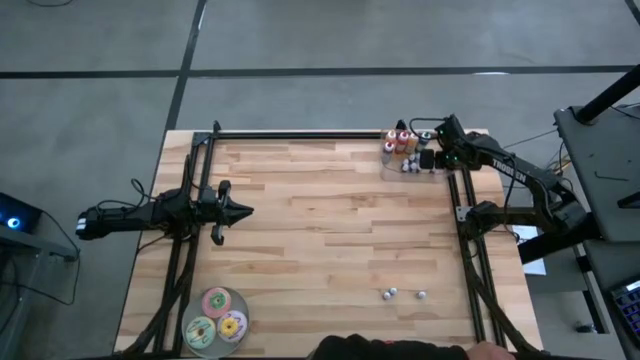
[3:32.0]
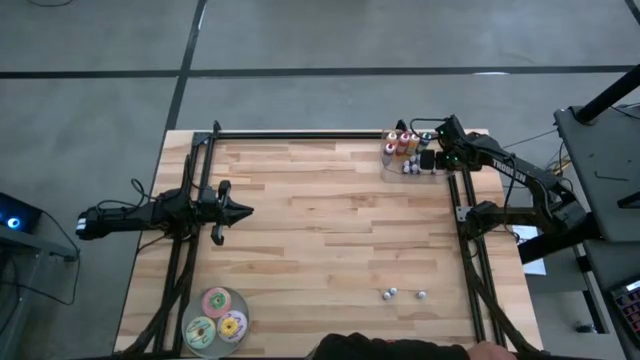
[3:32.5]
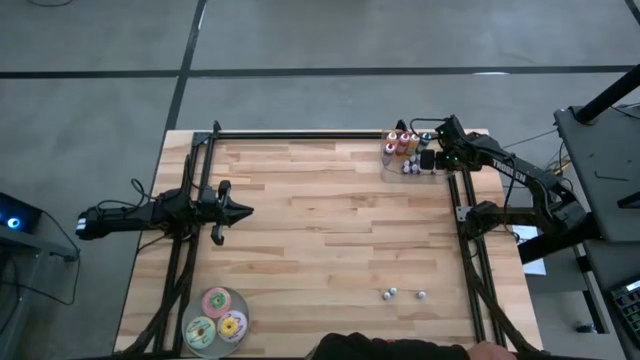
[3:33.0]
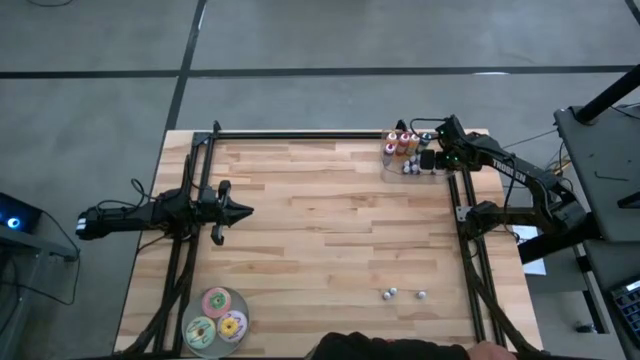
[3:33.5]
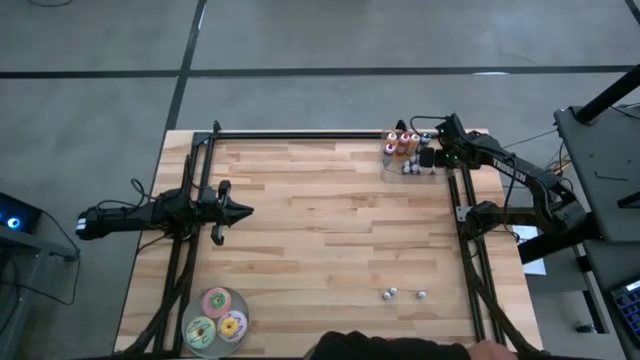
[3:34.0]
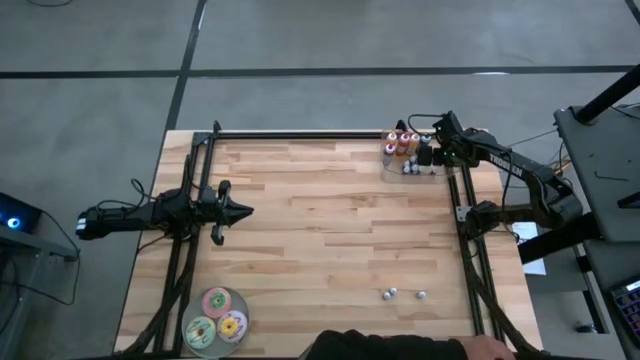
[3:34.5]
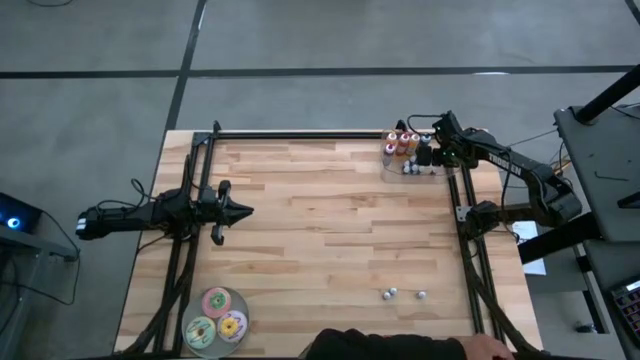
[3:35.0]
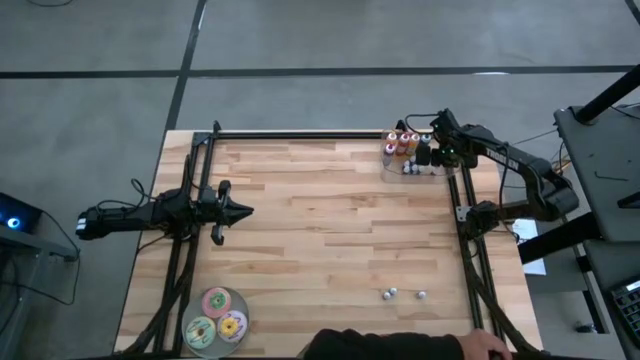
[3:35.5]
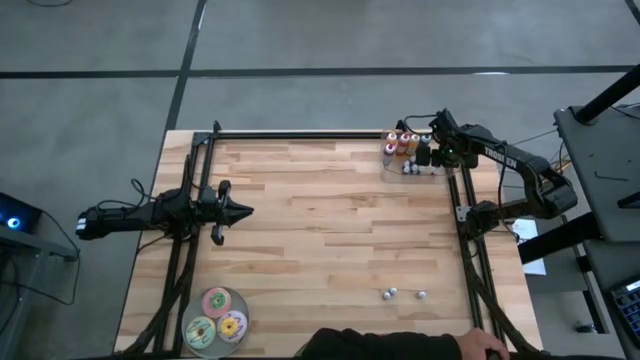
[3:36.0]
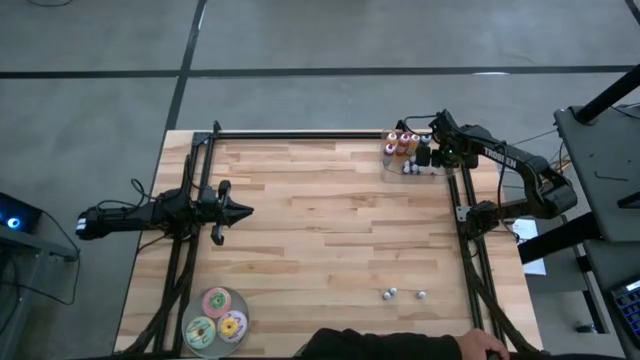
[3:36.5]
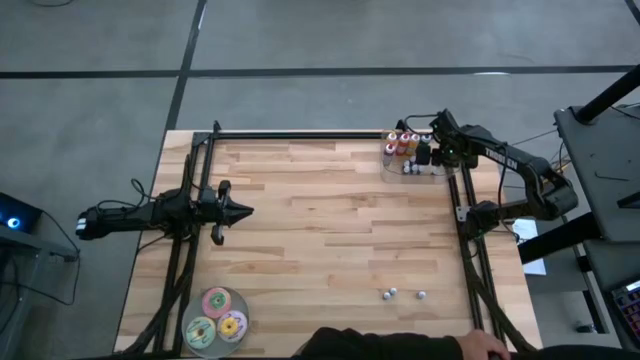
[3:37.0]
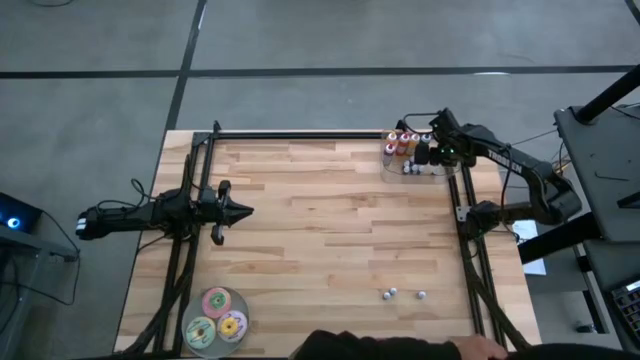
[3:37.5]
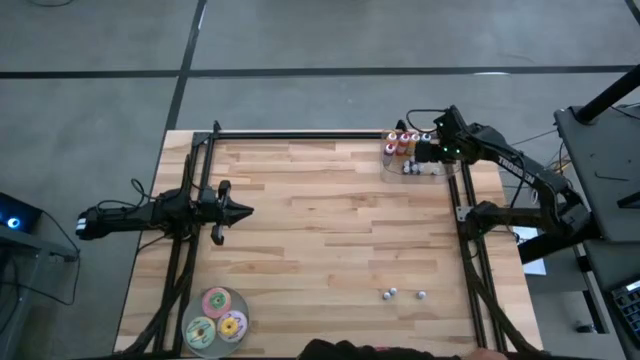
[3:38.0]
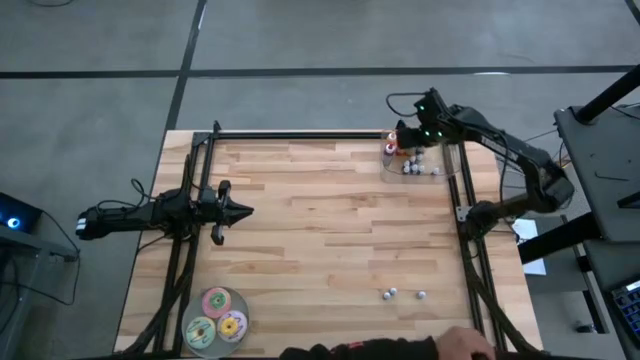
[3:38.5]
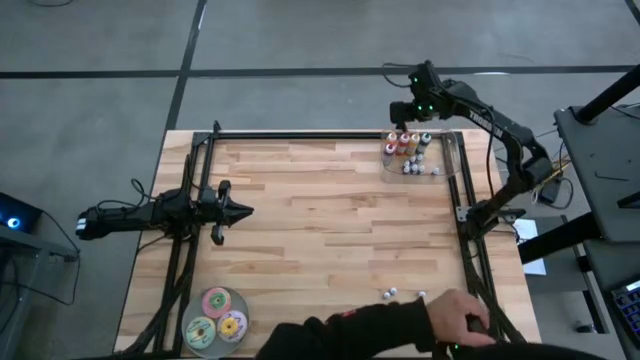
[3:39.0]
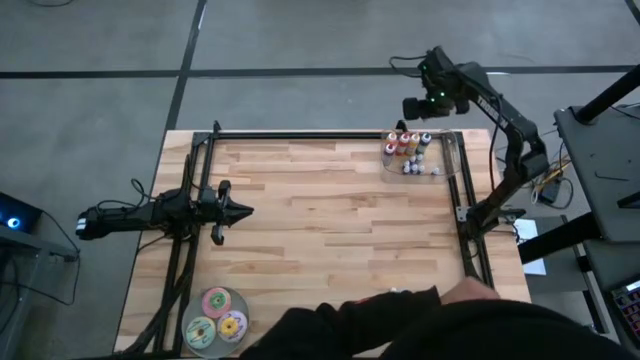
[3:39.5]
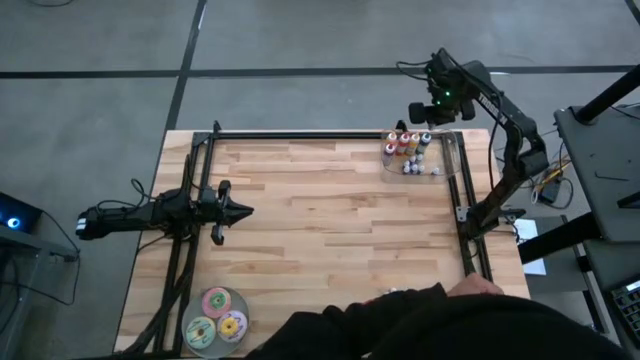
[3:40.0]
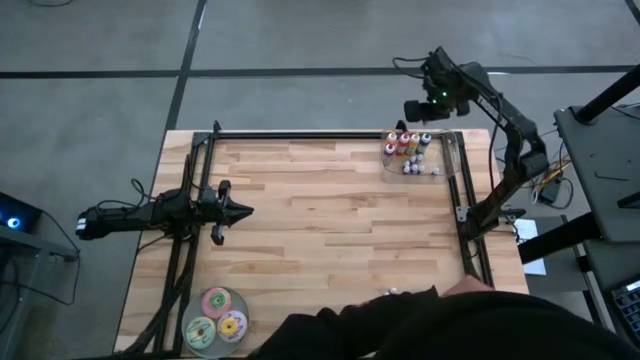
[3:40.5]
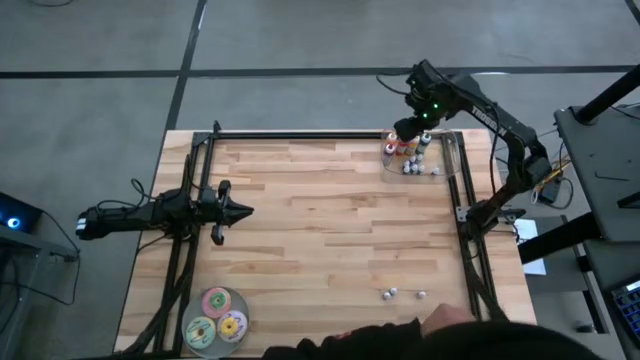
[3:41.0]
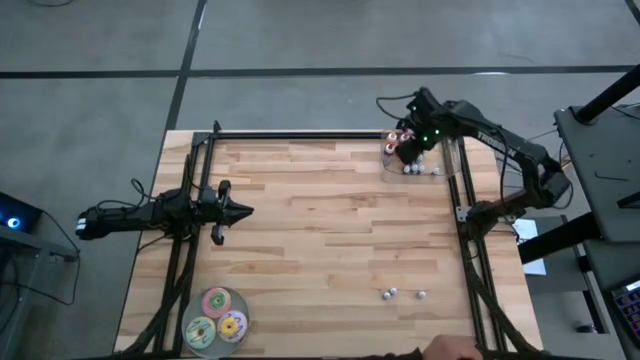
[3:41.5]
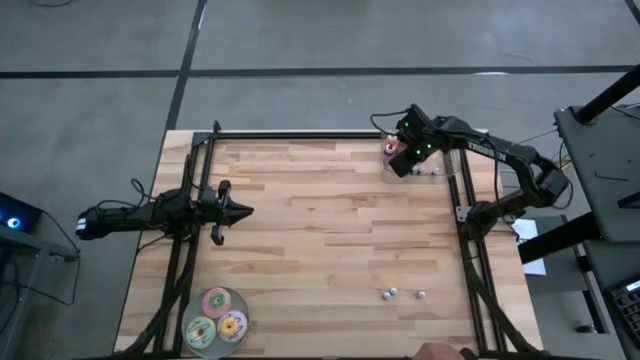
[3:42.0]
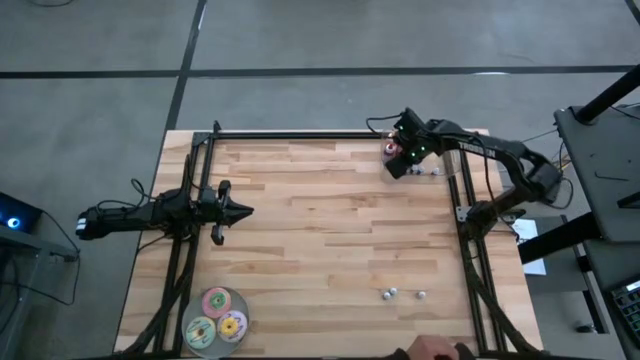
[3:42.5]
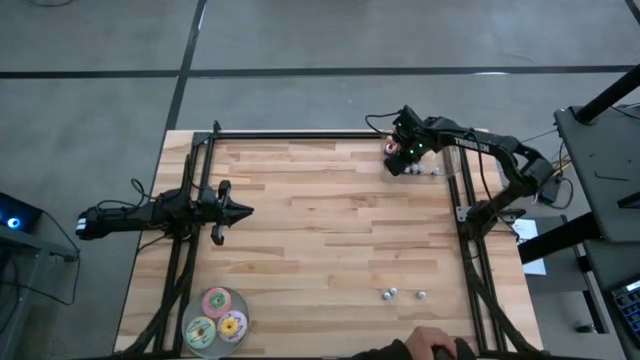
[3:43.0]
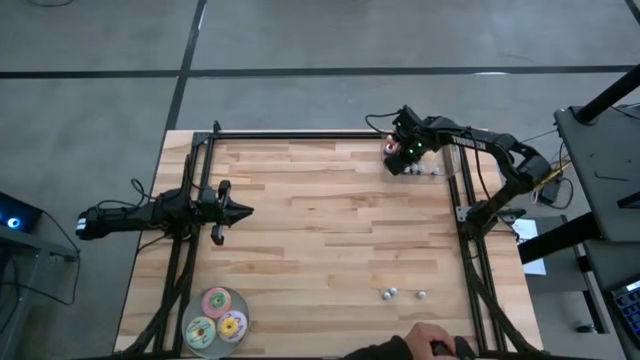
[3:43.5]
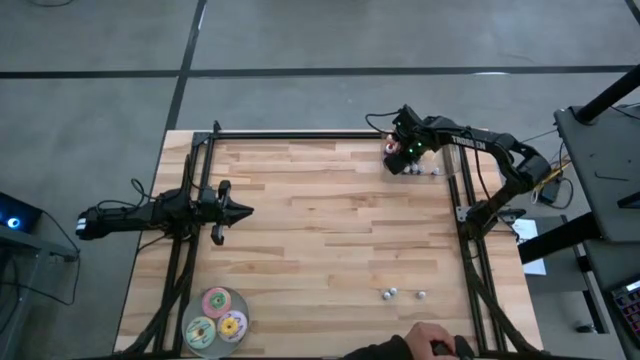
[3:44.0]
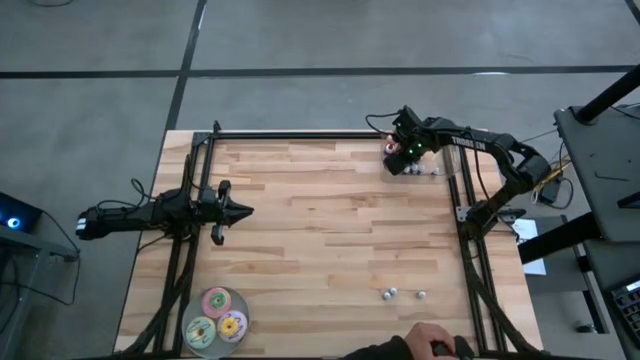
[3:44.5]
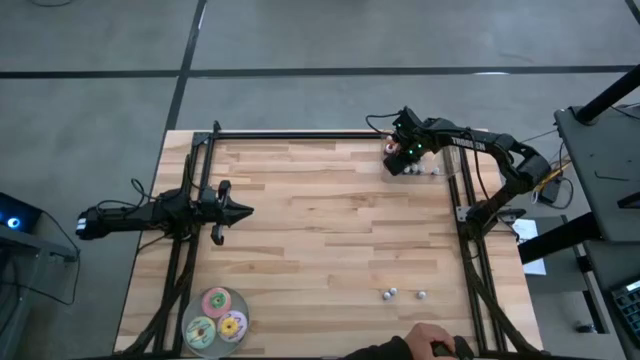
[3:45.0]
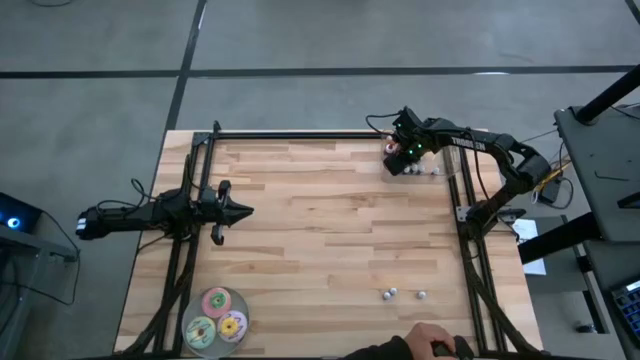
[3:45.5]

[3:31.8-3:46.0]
Task: Pick & Place food coloring
Put the small green food coloring bottle into the bin

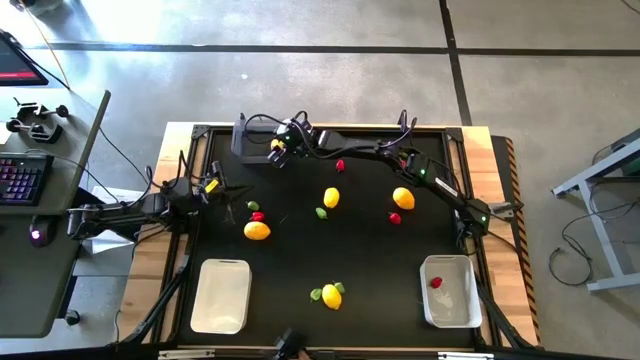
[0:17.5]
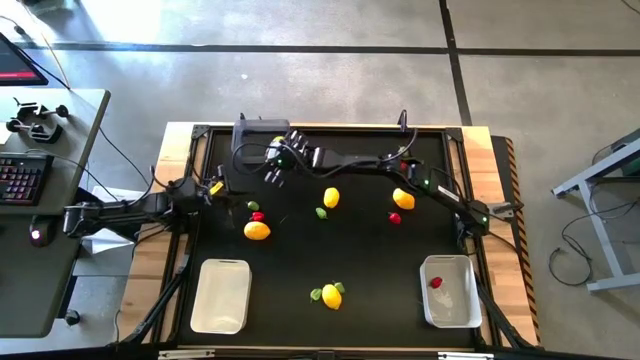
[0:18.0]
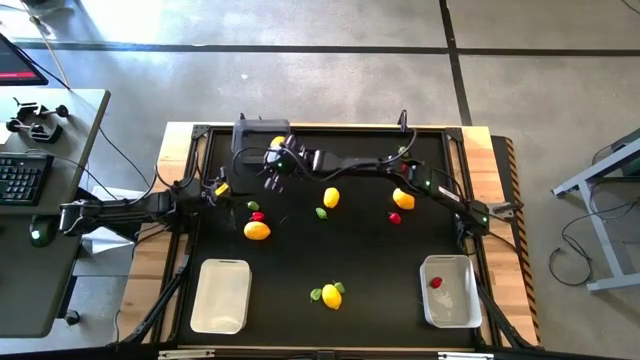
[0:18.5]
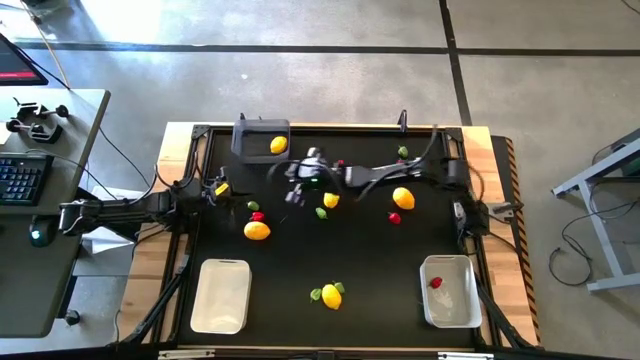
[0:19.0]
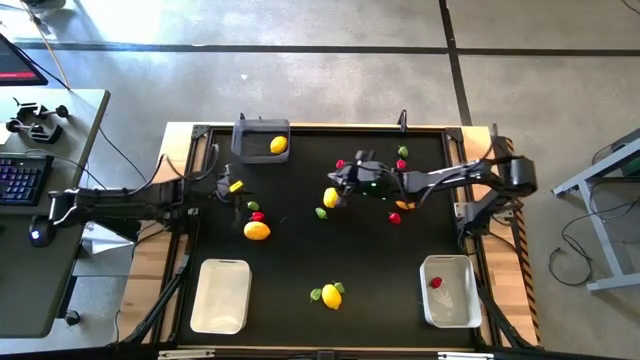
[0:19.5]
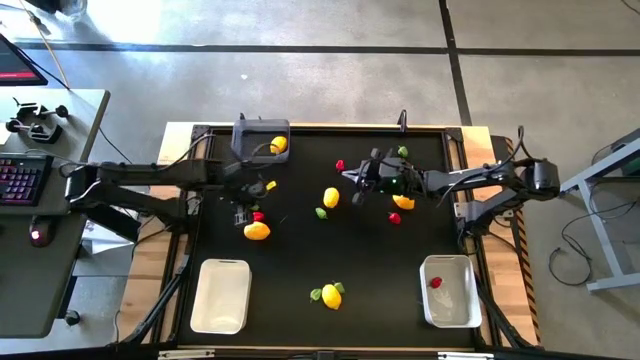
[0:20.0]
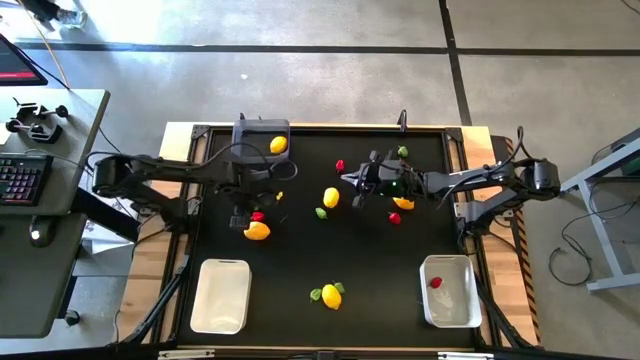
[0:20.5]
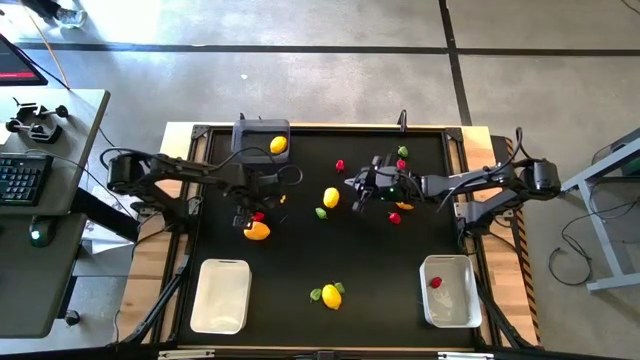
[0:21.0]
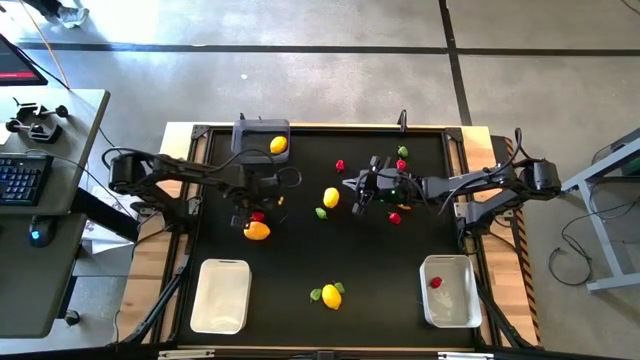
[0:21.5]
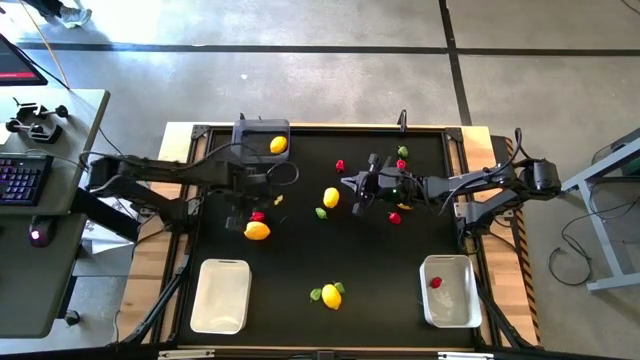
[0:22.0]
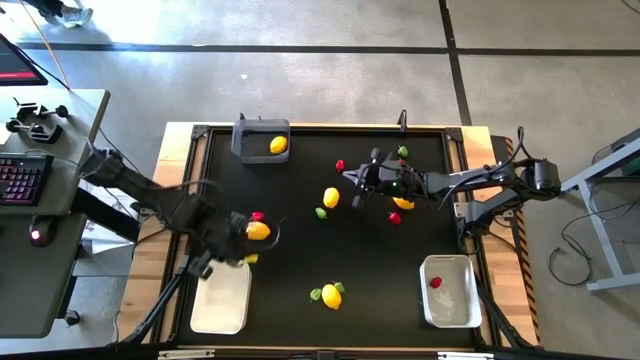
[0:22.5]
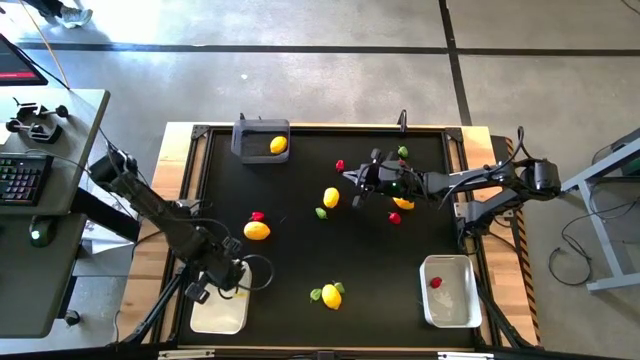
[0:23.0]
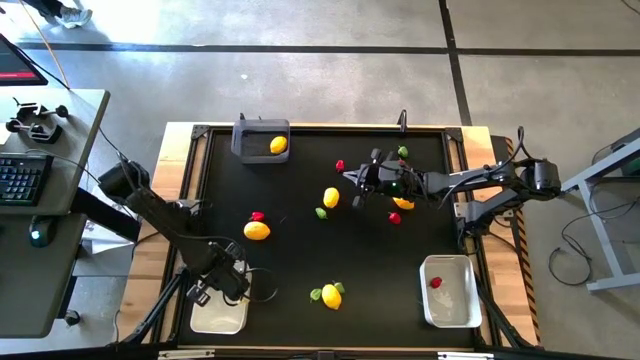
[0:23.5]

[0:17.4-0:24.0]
Task: Sort produce into baskets
Put the green chili pepper into the white bin
